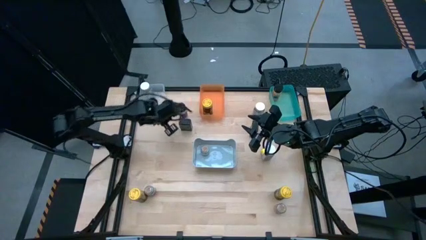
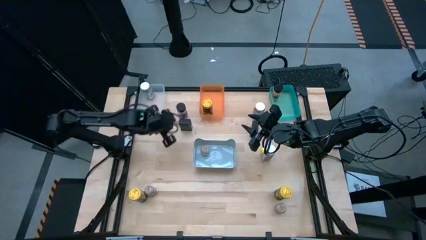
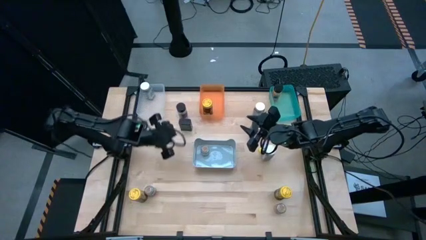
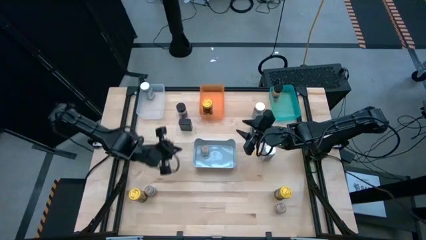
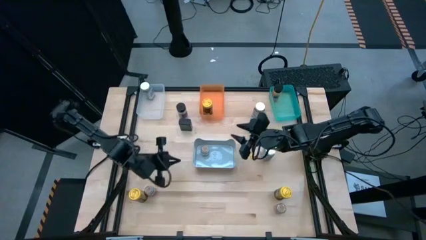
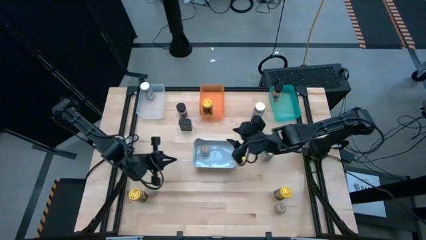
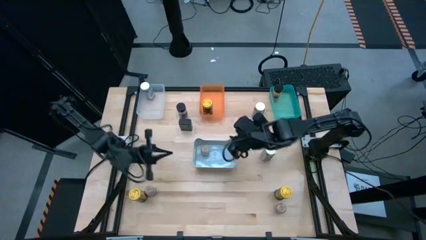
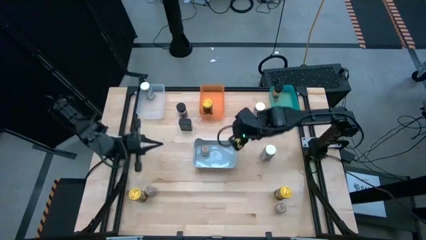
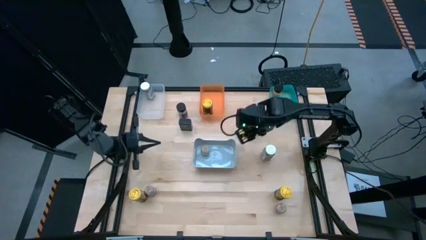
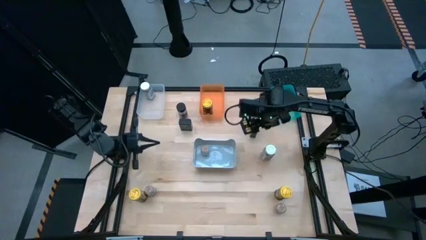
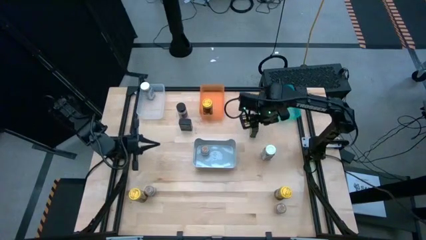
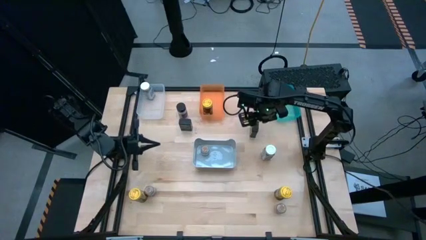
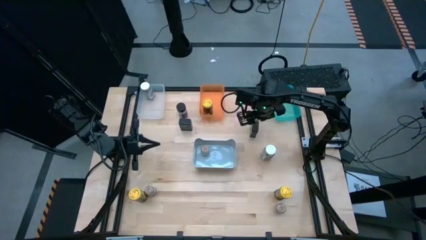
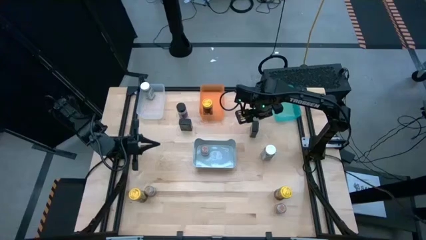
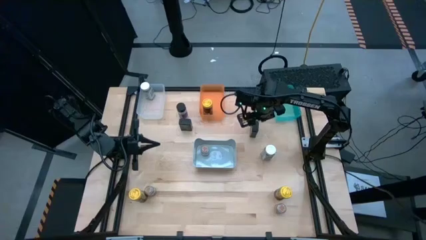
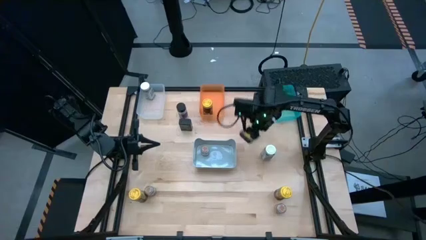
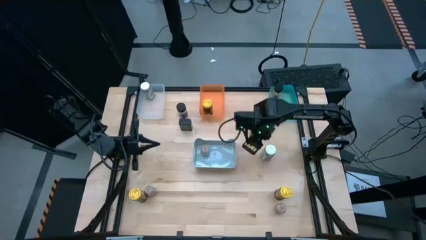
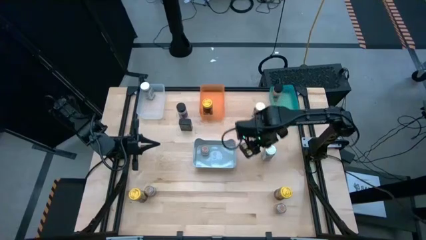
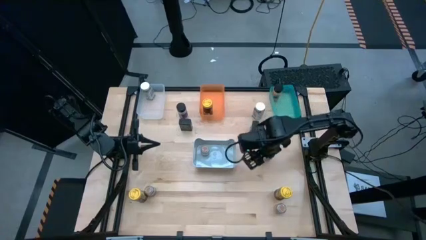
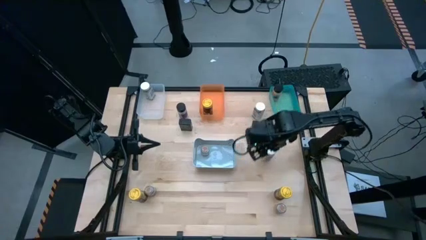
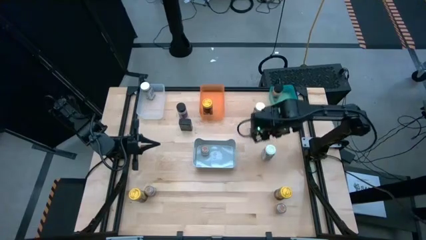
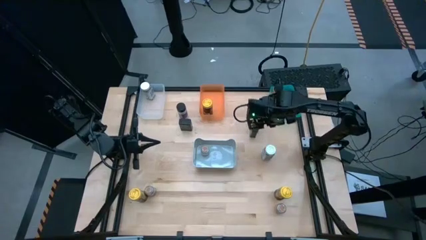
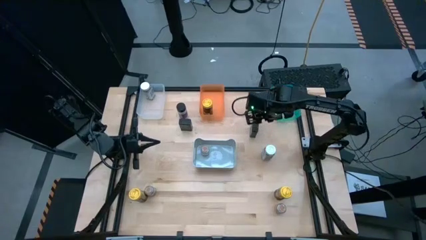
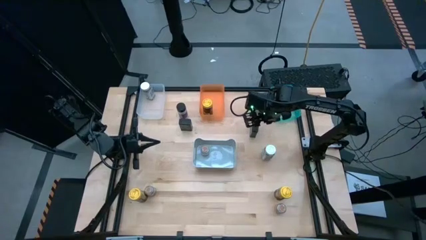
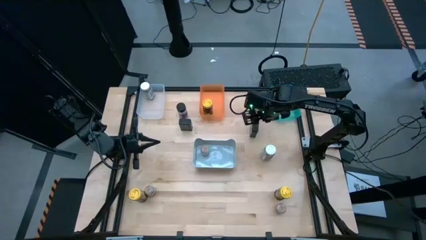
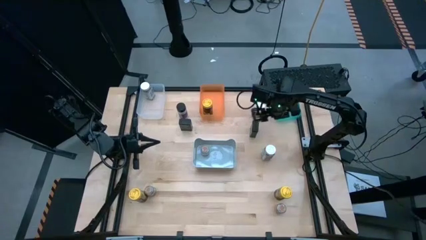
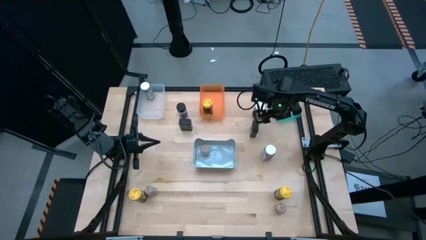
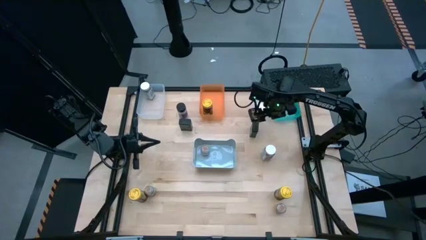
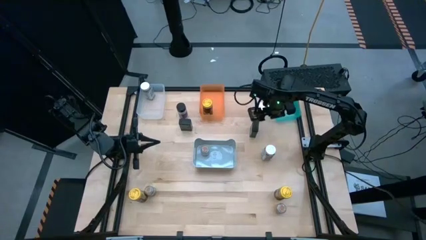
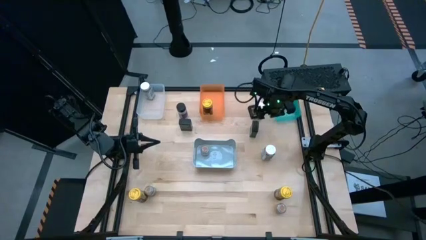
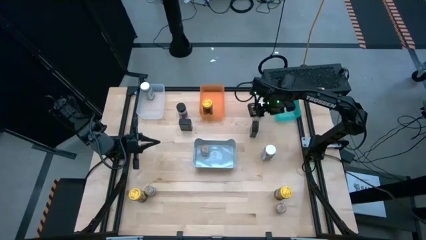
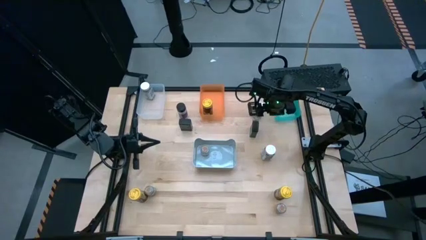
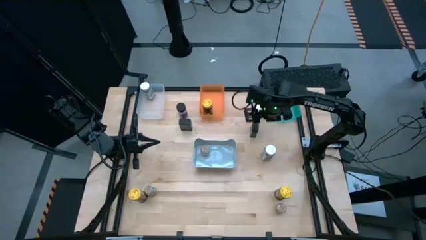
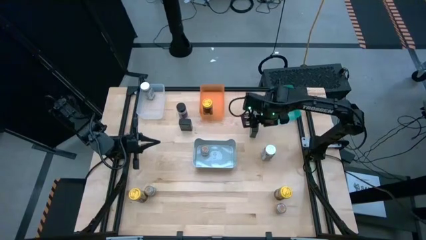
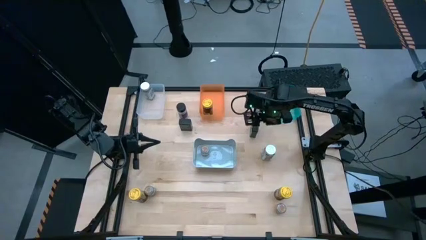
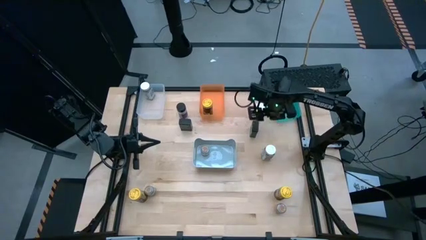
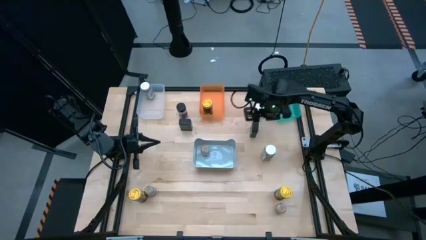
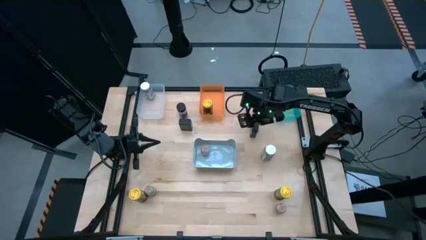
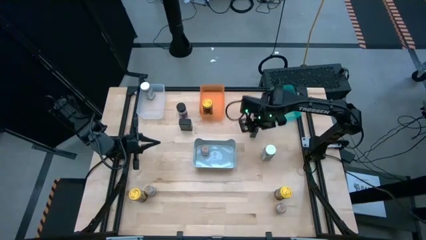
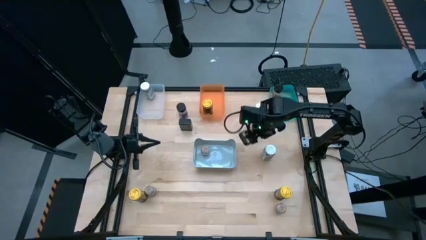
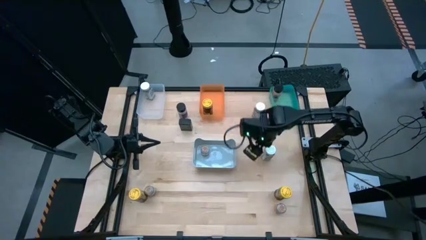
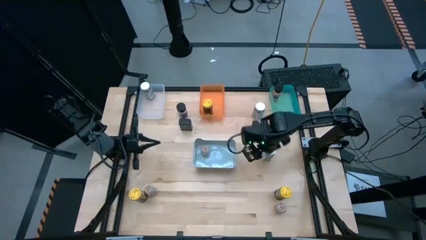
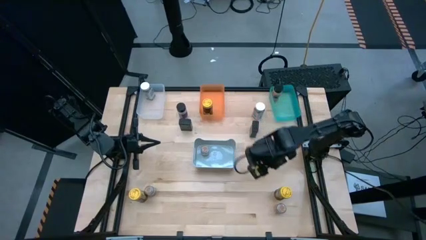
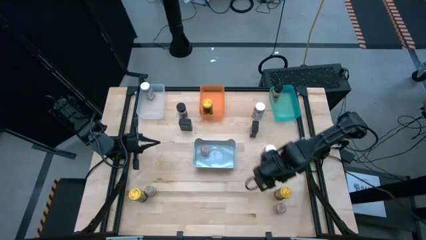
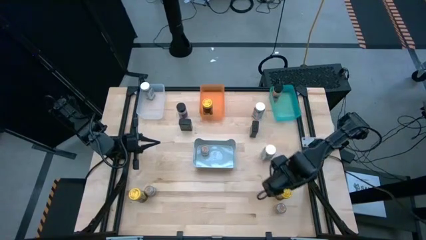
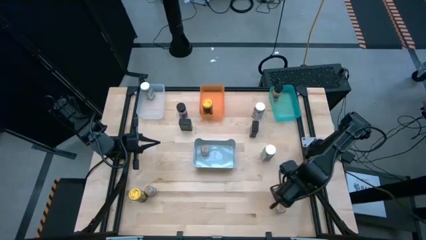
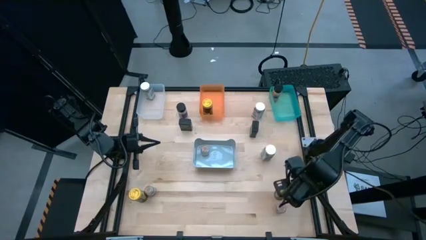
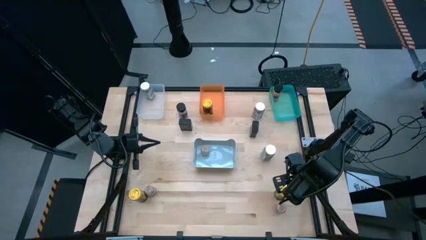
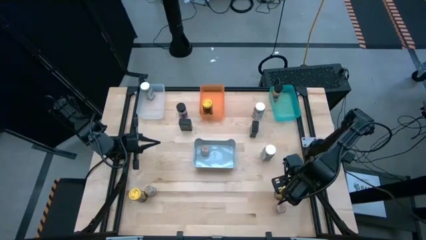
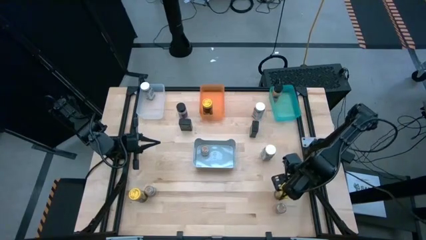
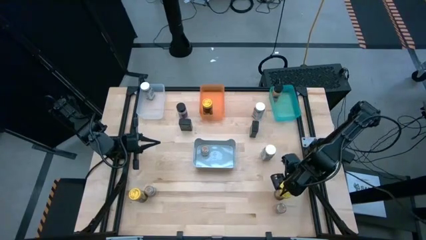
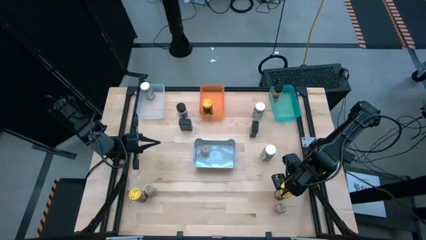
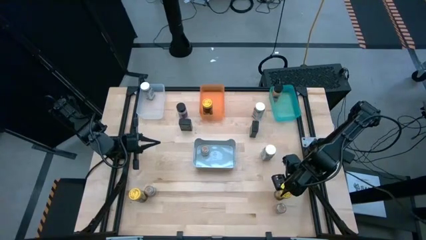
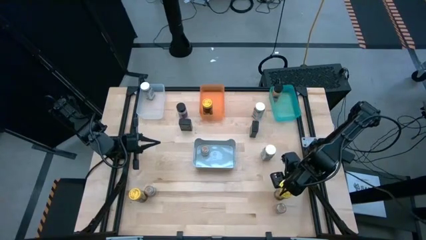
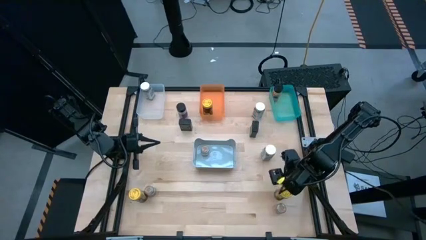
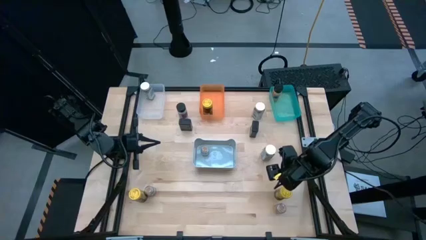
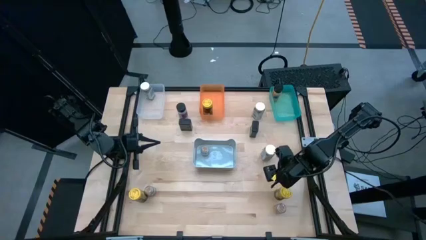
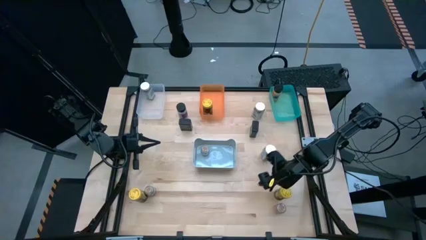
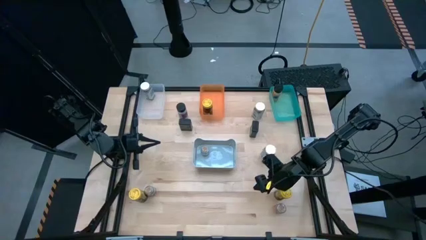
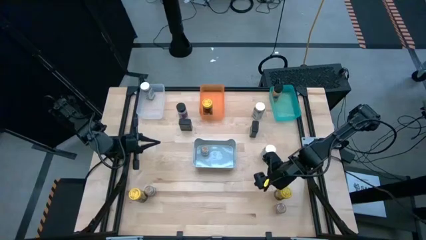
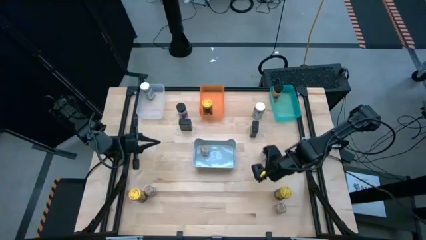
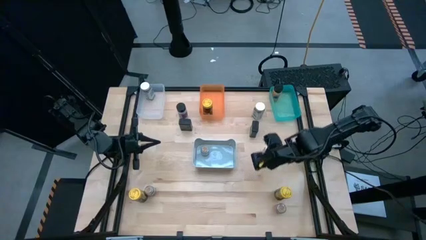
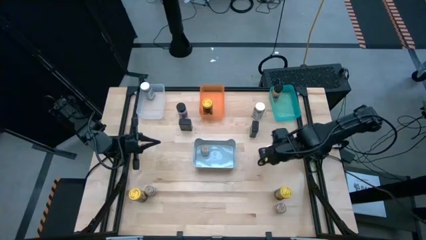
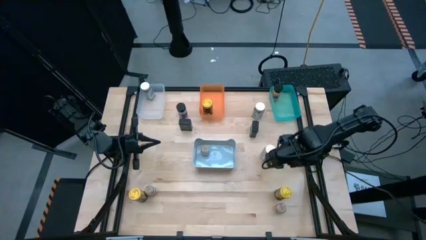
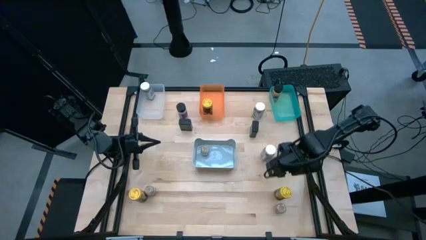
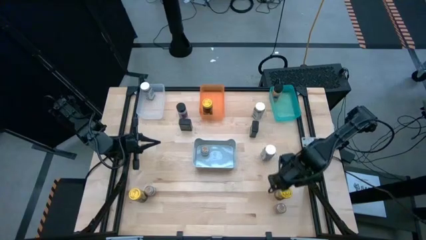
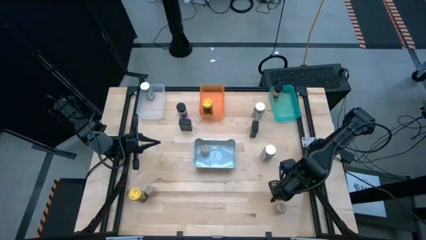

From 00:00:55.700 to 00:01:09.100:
Task: Sort spices by type
Put the right yellow seasoning bottle into the orange bin

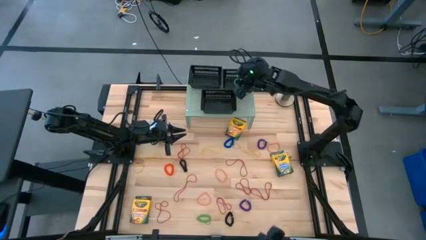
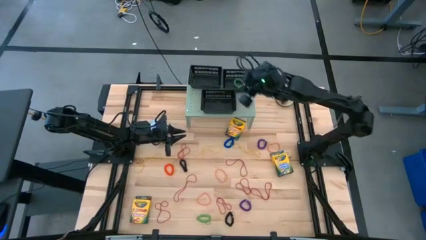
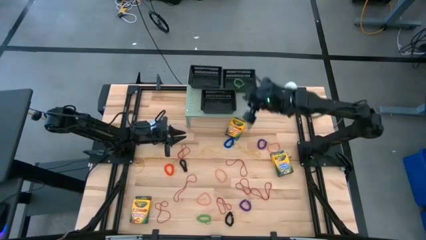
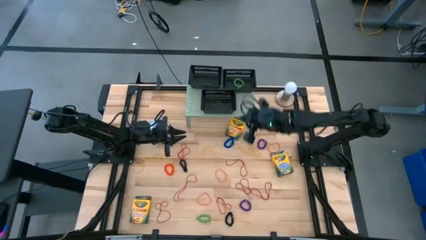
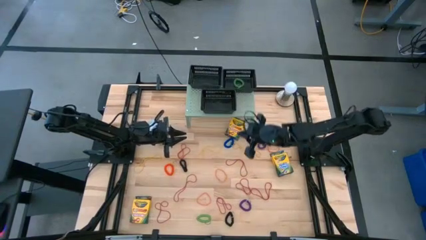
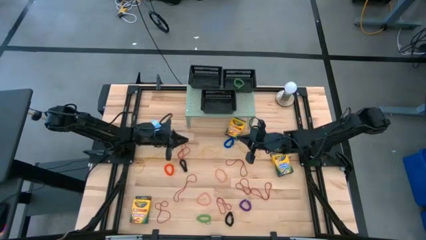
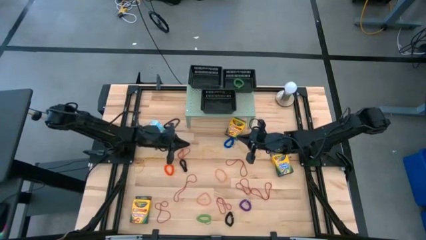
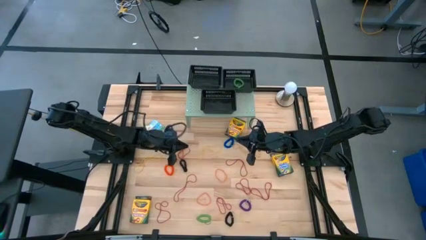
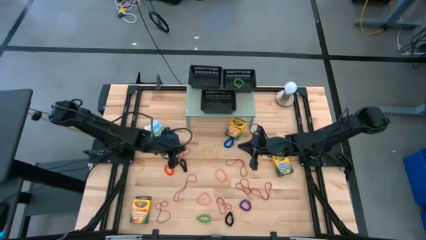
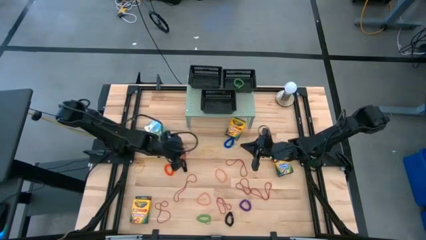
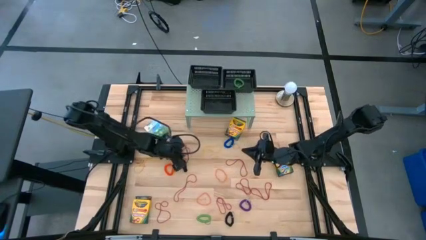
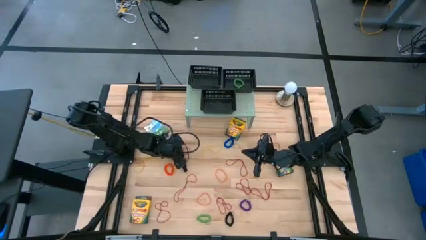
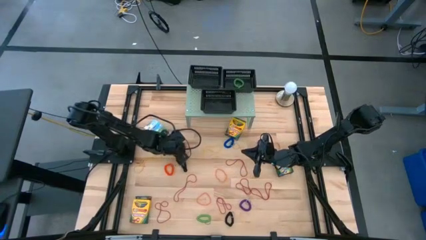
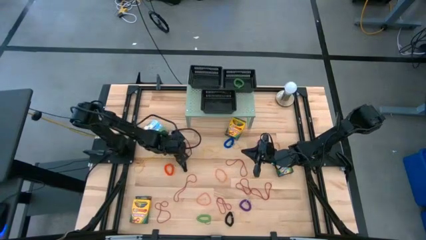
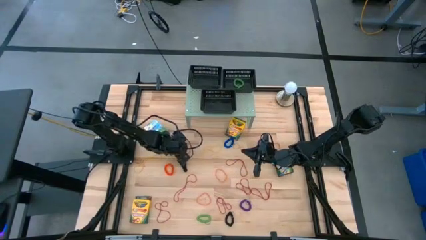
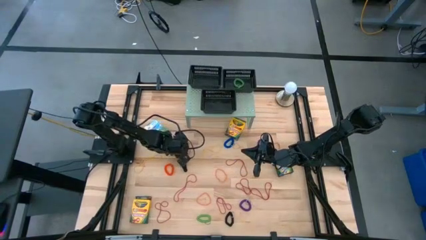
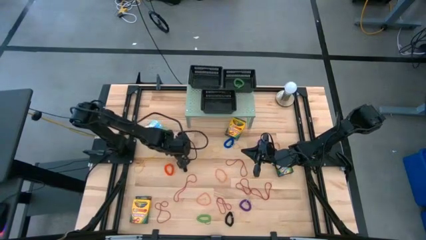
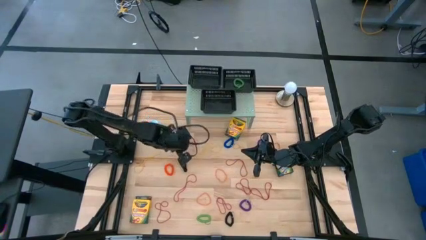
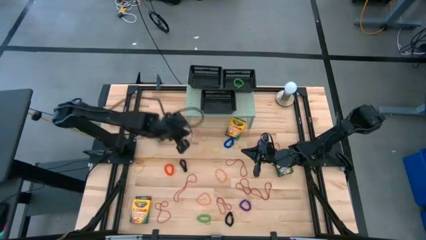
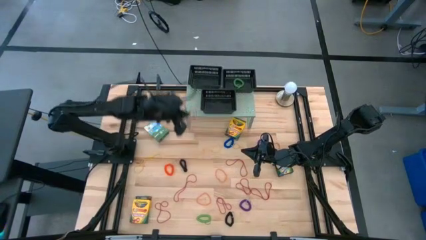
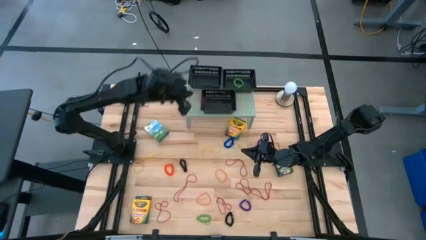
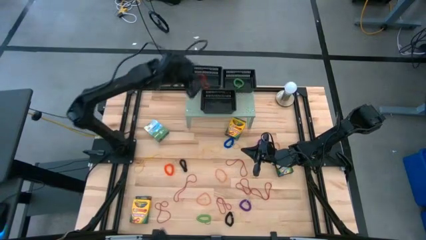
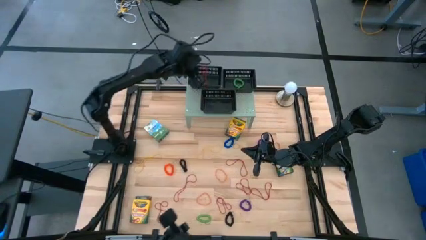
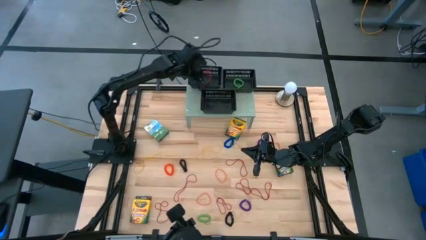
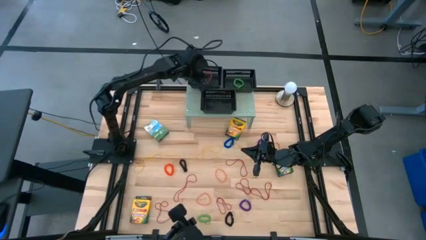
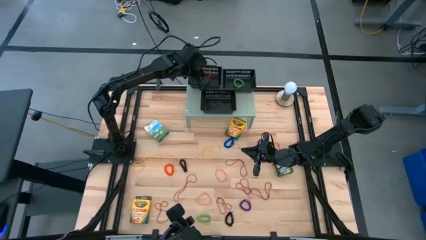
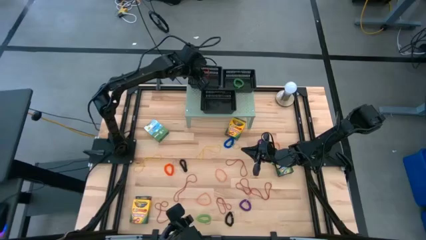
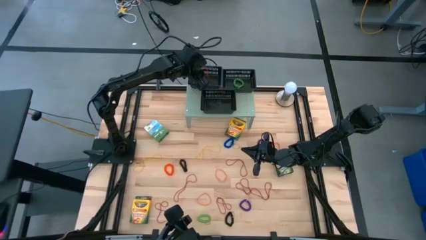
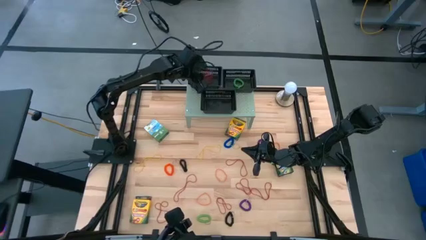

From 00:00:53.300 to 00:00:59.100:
Task: Pick & Place Office Desk Supplies
Put the red rubberband into the top left black bin
